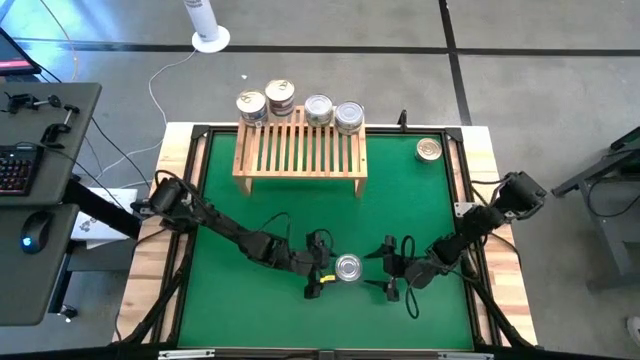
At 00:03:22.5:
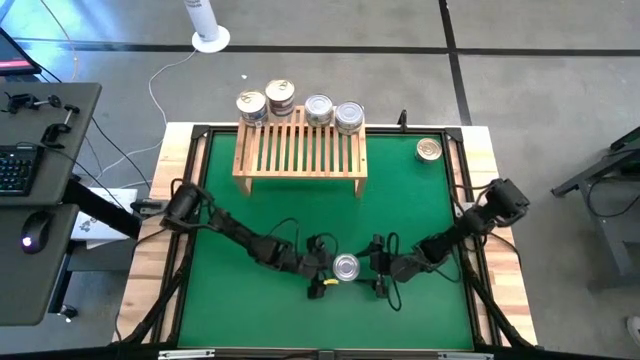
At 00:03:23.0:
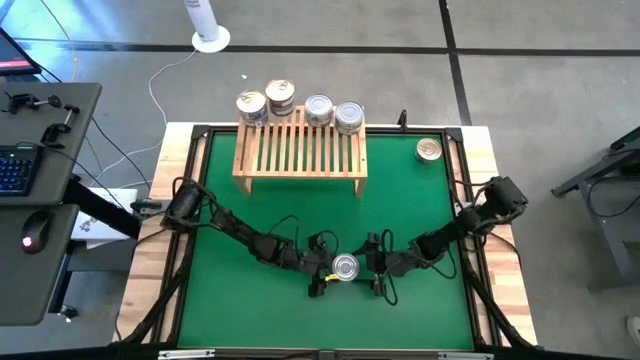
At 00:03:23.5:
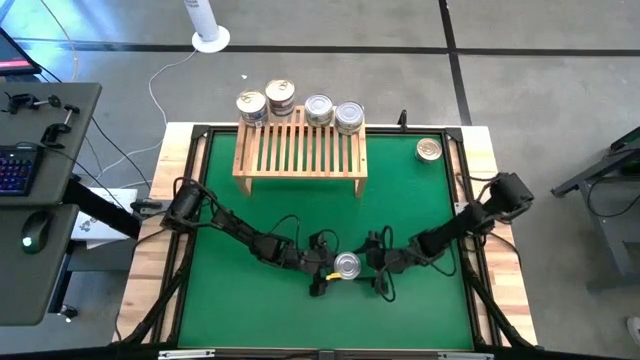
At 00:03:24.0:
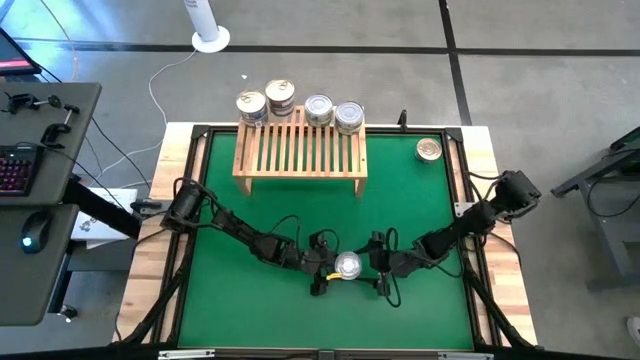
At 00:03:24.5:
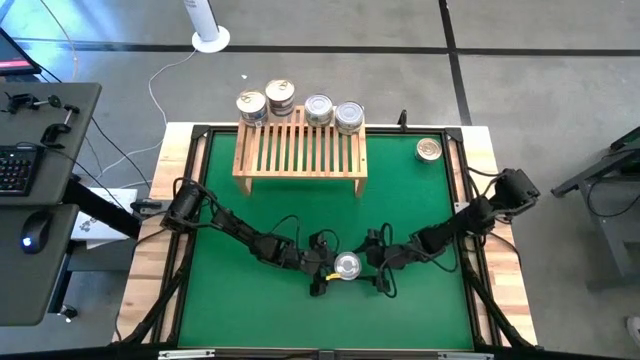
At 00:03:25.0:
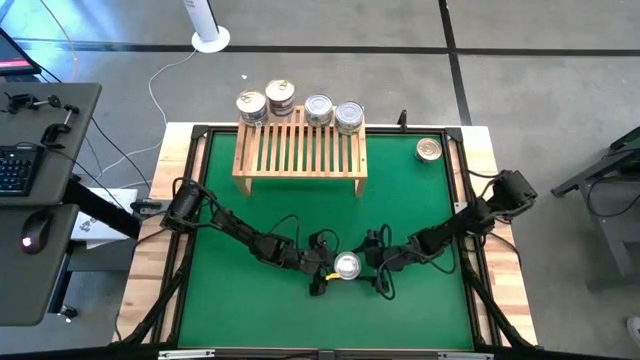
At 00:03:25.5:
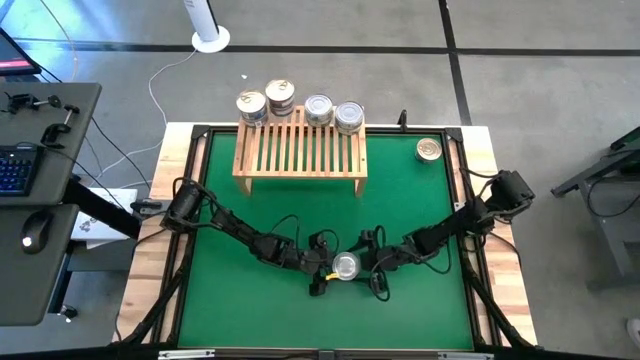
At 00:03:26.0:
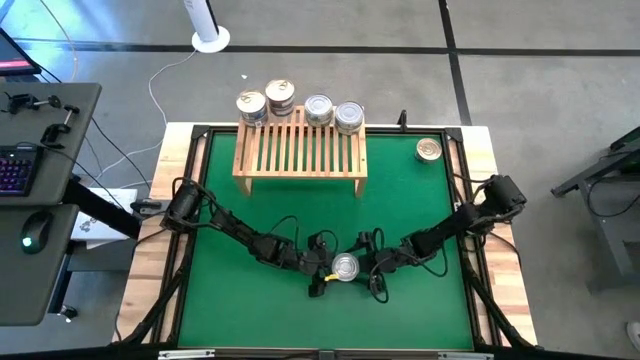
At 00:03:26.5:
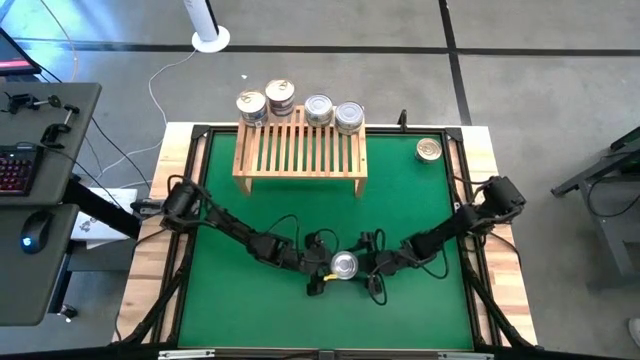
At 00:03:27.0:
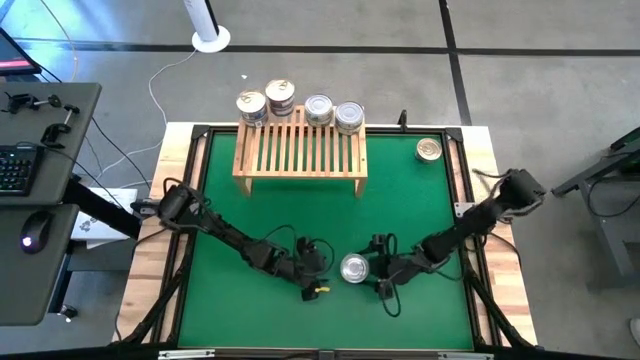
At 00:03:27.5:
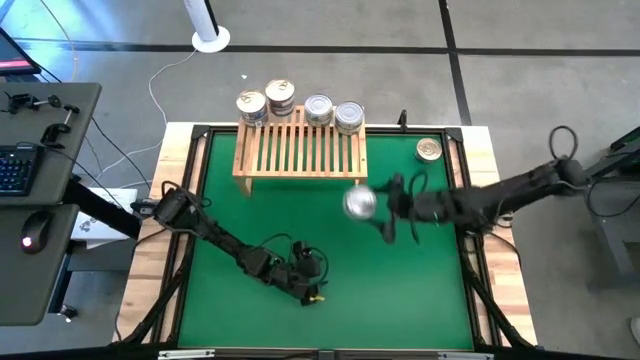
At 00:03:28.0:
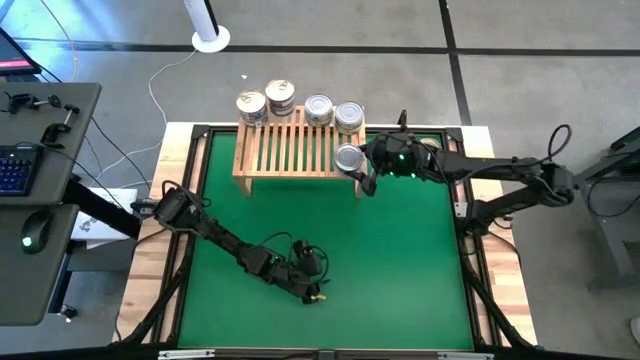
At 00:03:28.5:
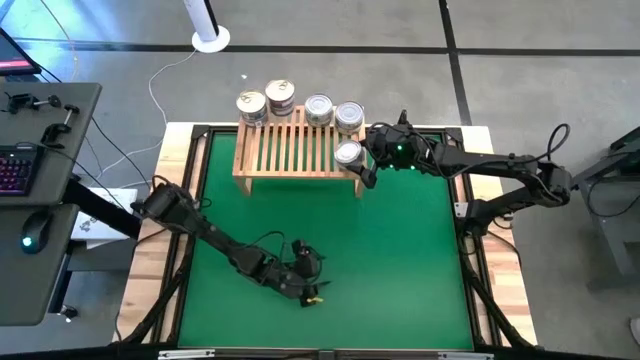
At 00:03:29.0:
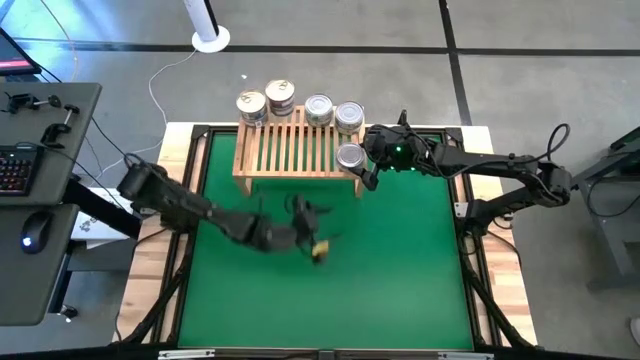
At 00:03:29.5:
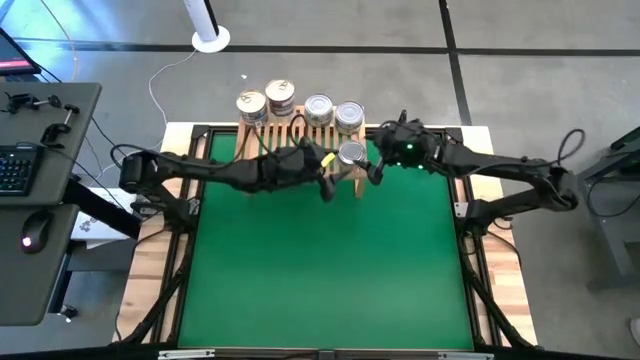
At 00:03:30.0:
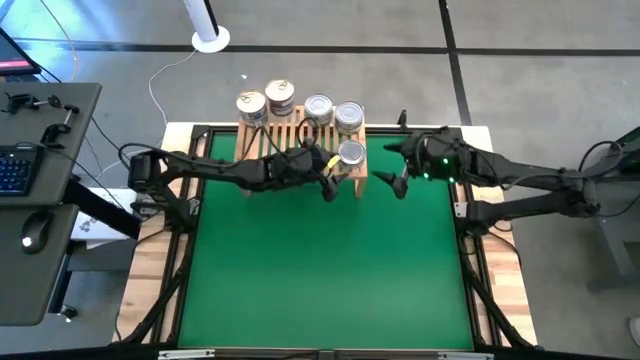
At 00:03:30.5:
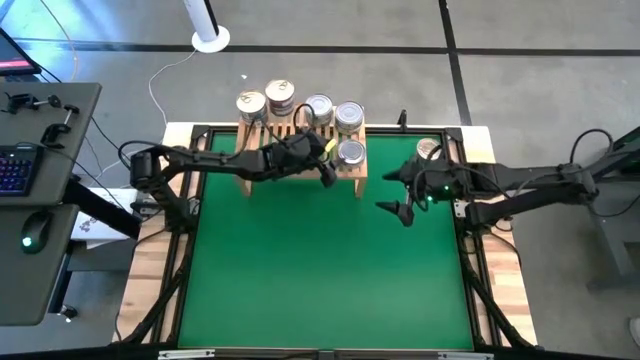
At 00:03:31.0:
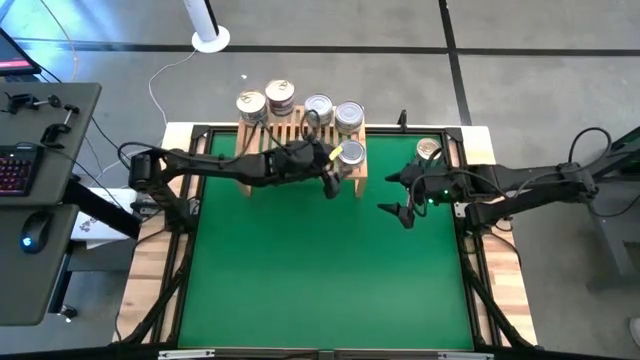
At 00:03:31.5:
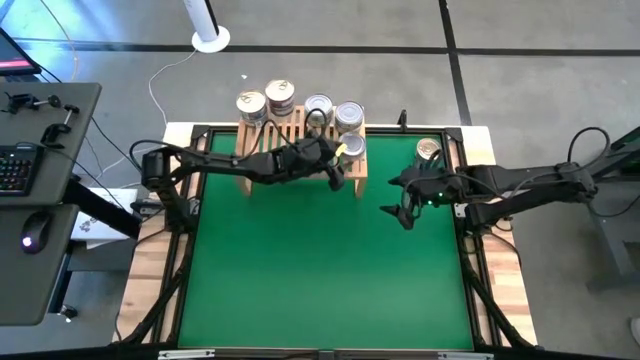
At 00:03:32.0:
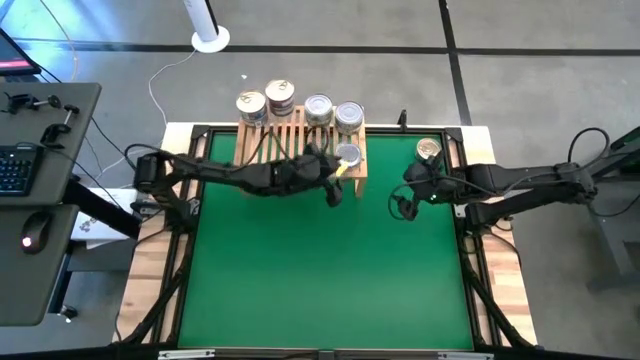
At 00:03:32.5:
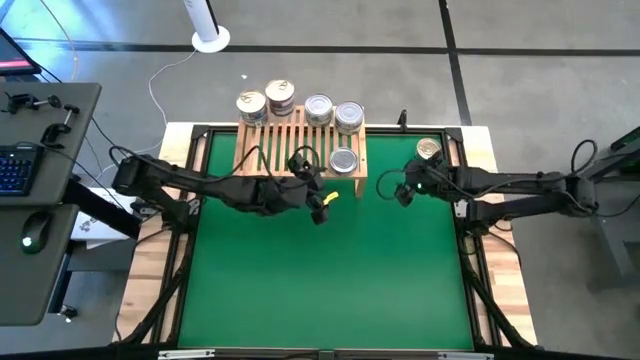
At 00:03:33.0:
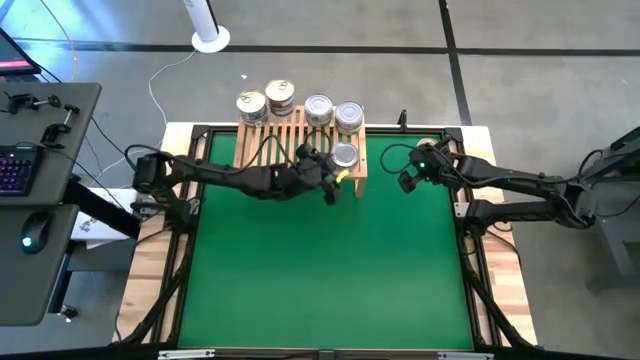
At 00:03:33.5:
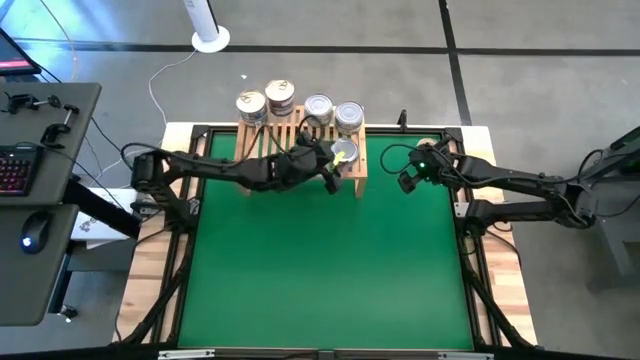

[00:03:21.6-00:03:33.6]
Task: Stack canned seafood by type on shelf
Put the green white tuna can on the shelf

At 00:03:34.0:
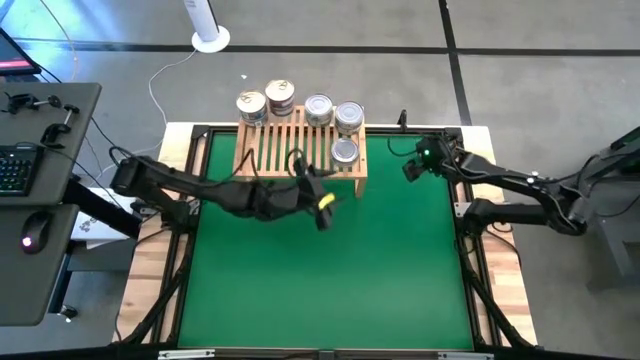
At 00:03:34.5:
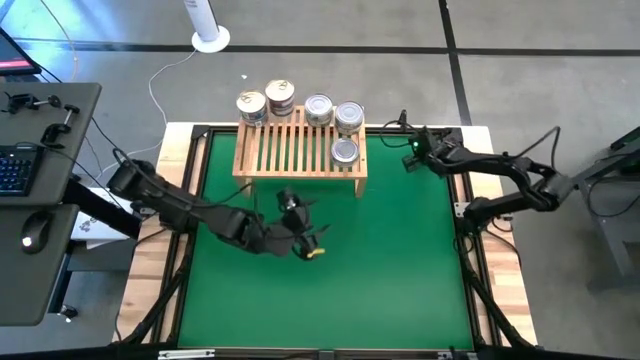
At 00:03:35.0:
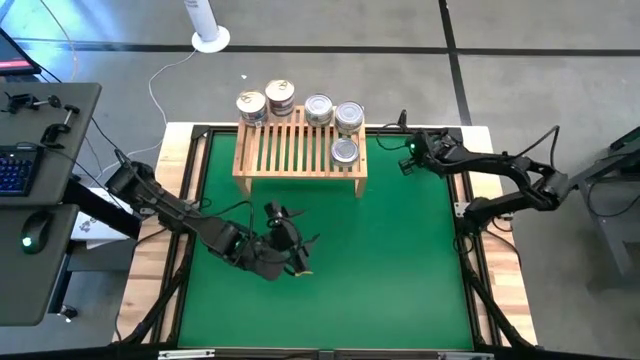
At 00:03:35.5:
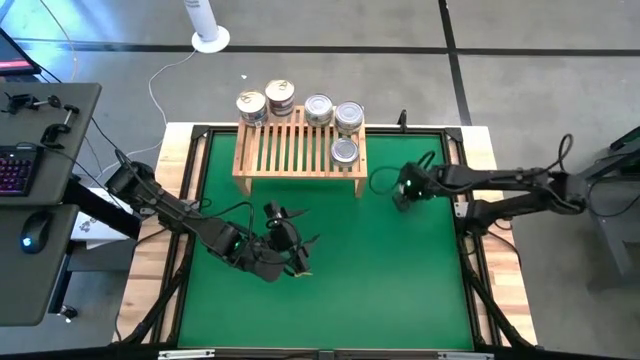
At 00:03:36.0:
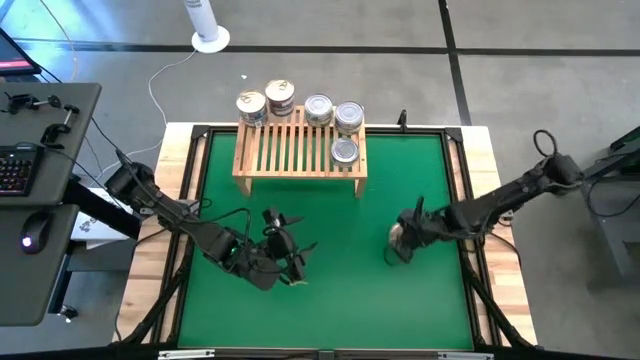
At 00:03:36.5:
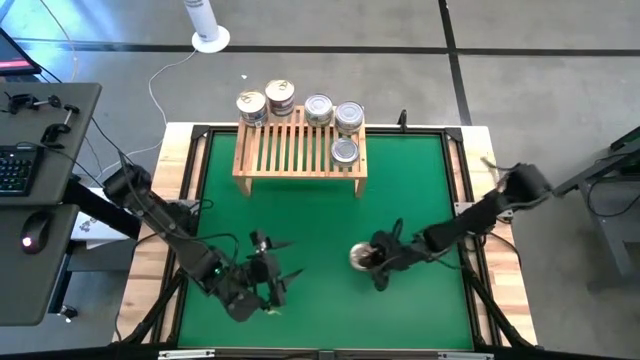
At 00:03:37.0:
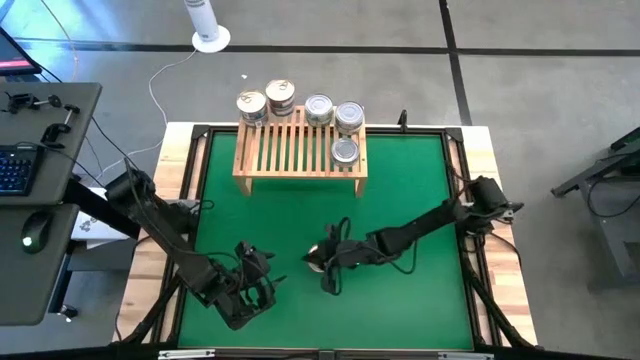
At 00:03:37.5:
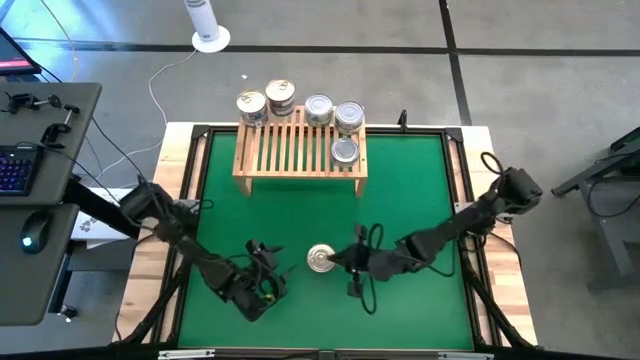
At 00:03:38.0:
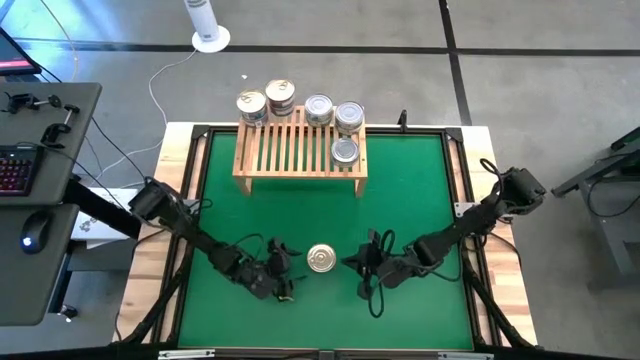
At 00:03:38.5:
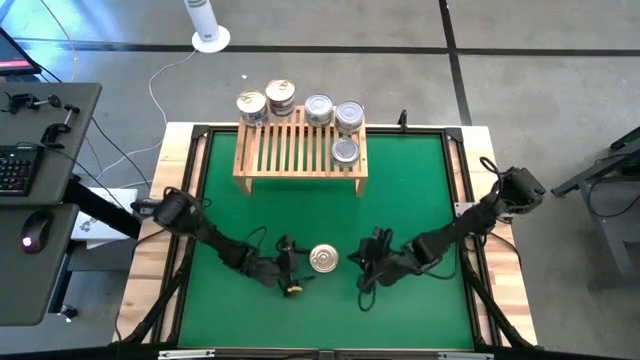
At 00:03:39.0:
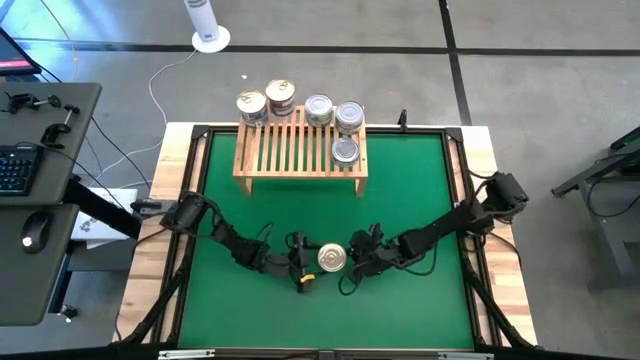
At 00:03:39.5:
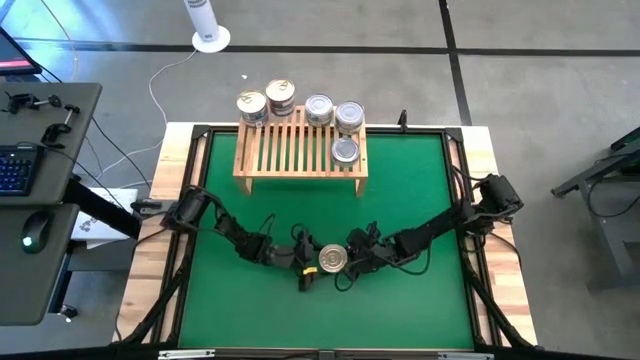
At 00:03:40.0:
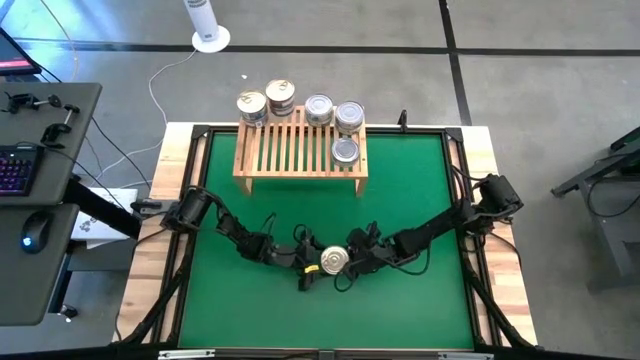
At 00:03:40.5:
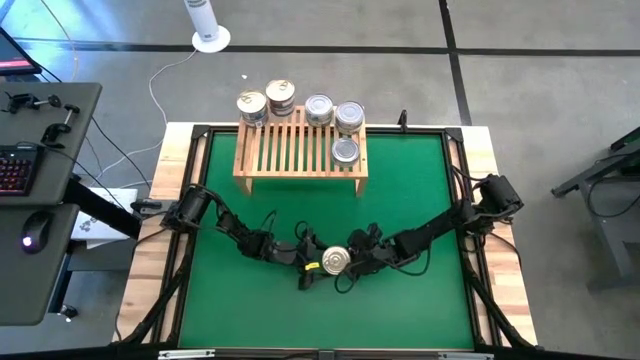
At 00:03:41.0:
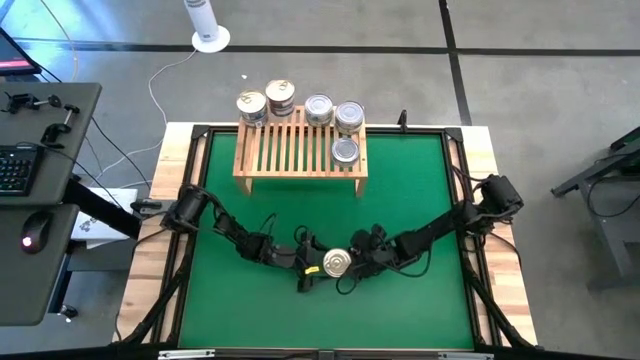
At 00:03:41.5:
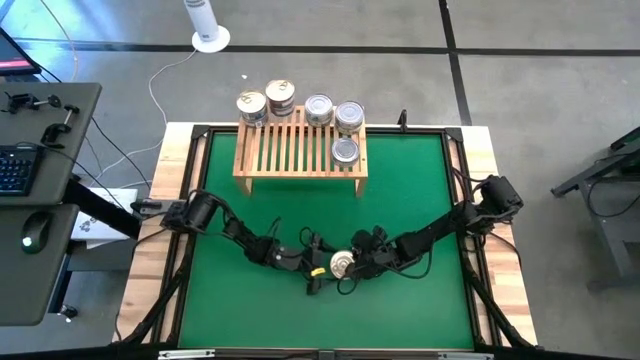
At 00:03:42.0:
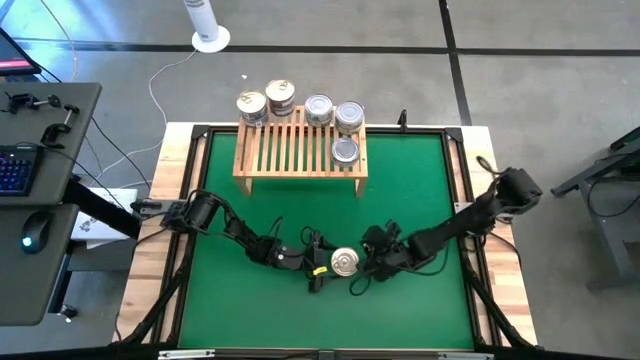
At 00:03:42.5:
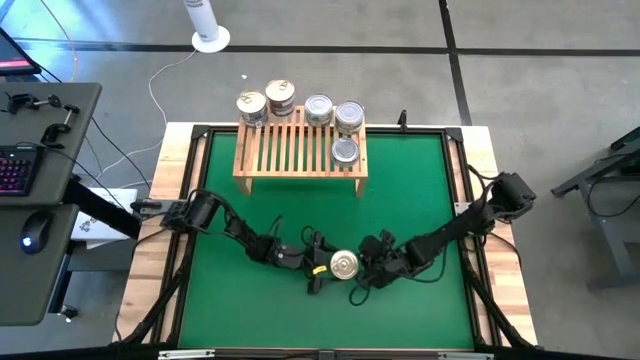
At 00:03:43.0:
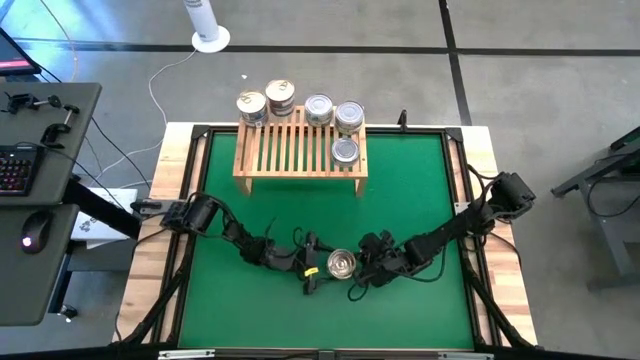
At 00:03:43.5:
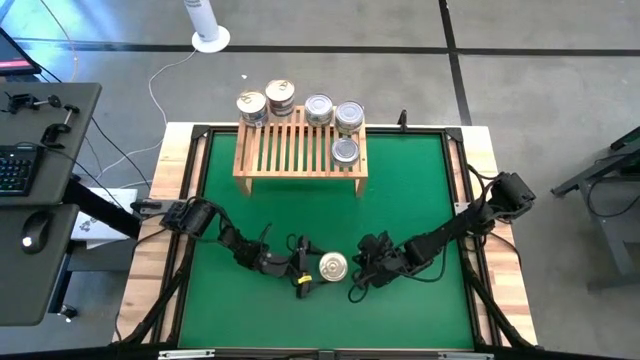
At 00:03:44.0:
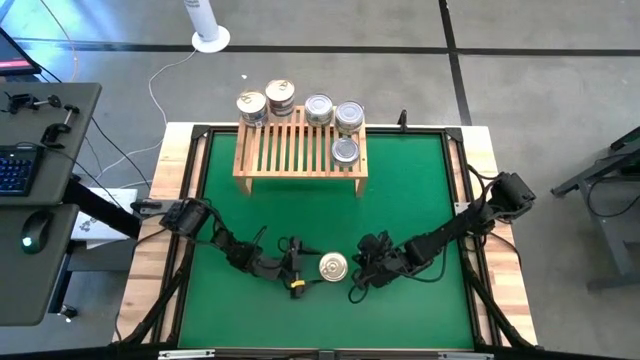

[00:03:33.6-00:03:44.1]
Put the blue pink tuna can on the shelf
